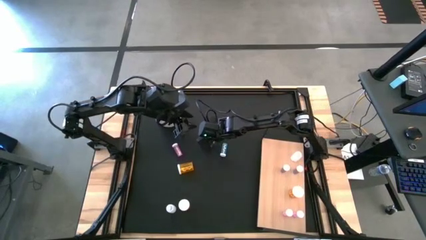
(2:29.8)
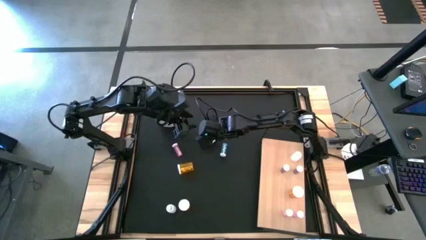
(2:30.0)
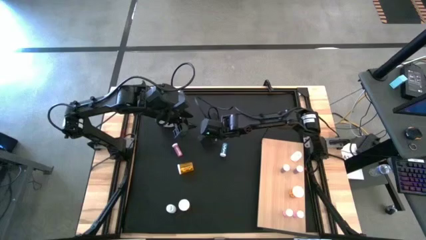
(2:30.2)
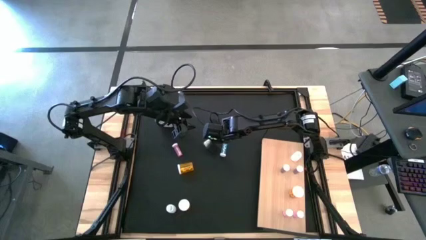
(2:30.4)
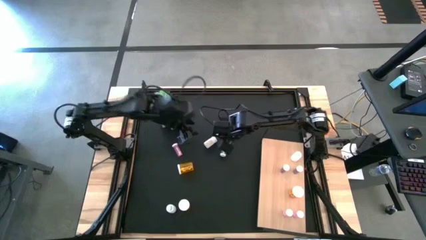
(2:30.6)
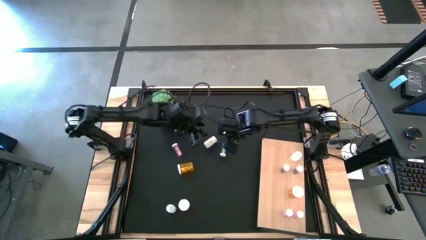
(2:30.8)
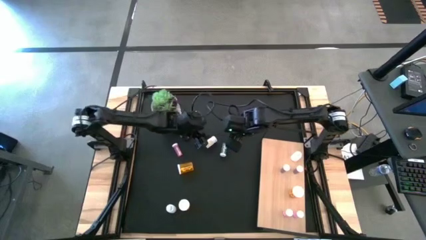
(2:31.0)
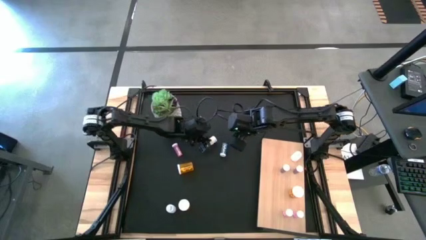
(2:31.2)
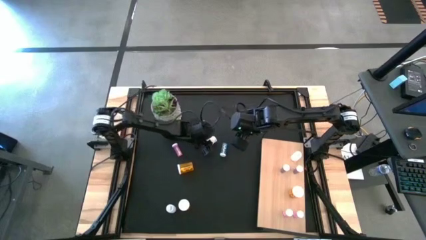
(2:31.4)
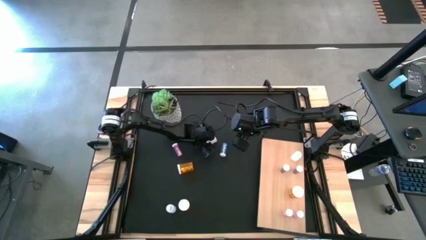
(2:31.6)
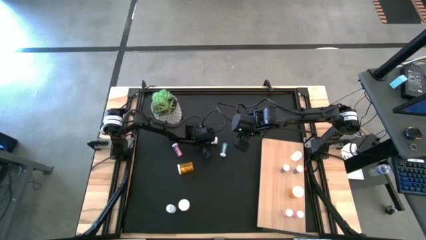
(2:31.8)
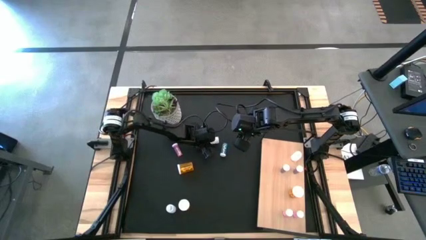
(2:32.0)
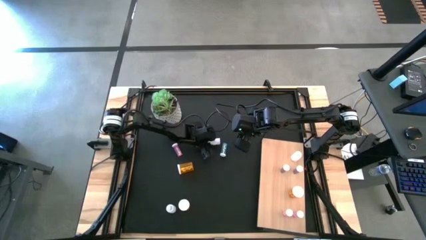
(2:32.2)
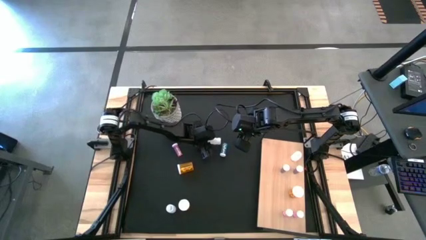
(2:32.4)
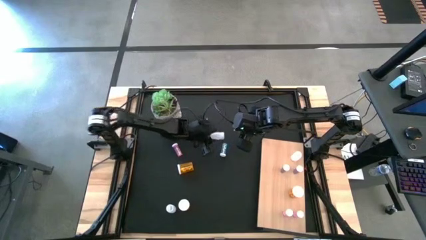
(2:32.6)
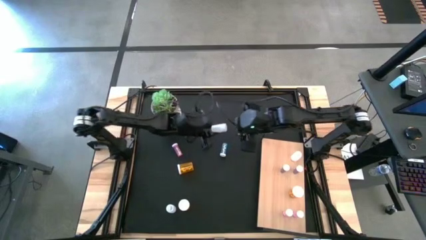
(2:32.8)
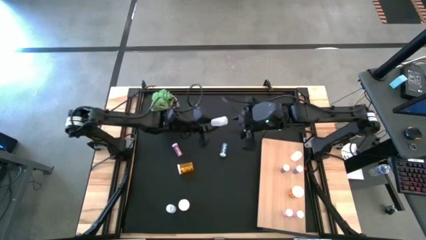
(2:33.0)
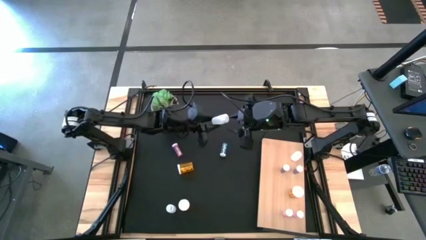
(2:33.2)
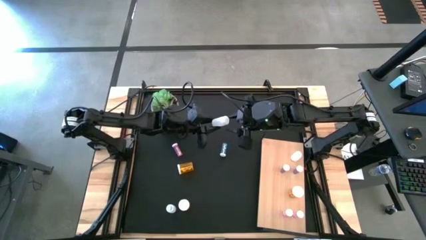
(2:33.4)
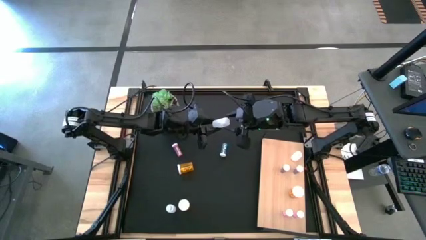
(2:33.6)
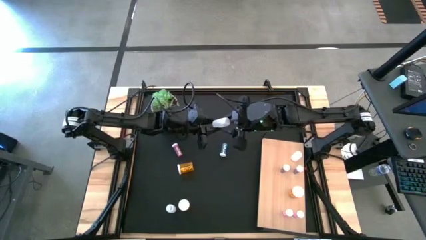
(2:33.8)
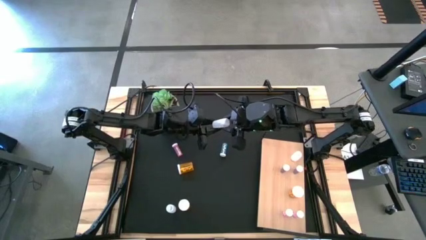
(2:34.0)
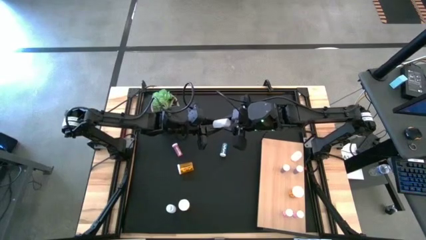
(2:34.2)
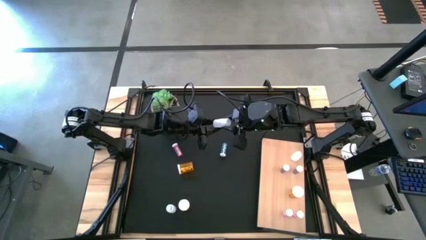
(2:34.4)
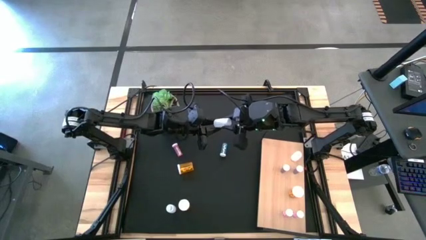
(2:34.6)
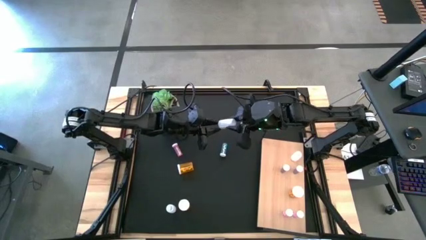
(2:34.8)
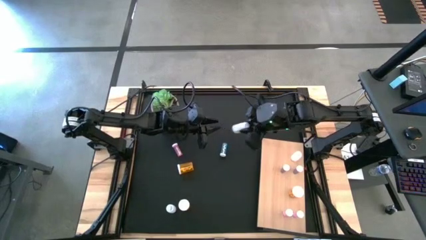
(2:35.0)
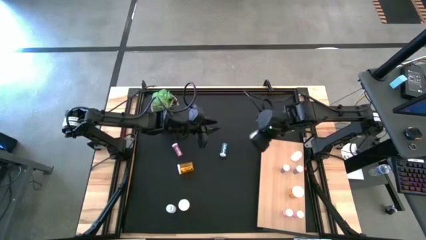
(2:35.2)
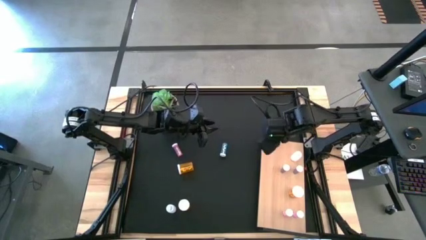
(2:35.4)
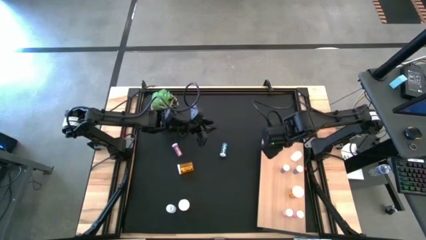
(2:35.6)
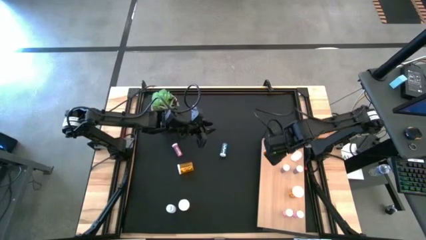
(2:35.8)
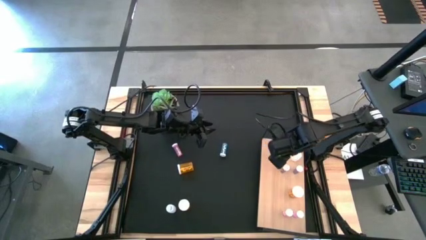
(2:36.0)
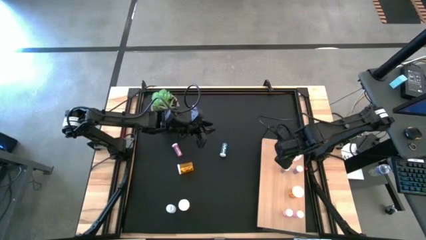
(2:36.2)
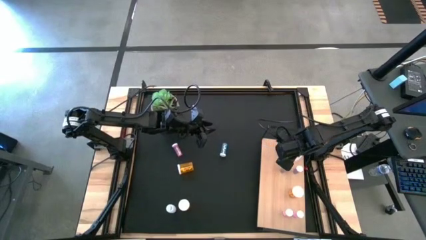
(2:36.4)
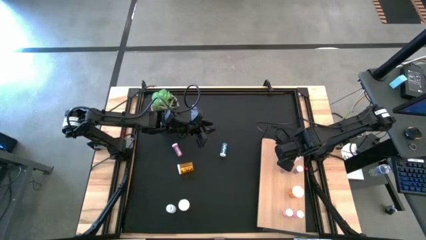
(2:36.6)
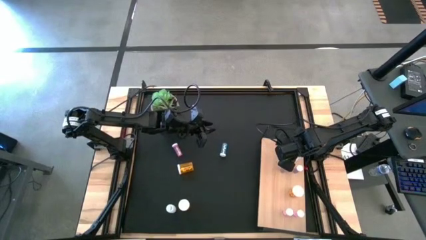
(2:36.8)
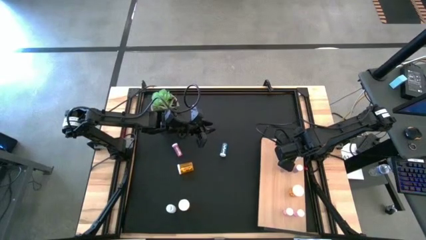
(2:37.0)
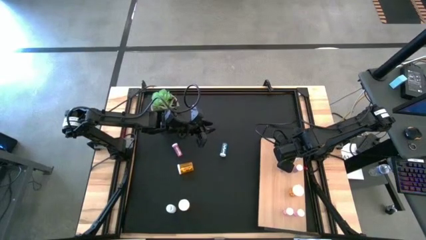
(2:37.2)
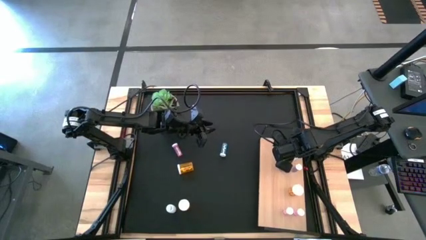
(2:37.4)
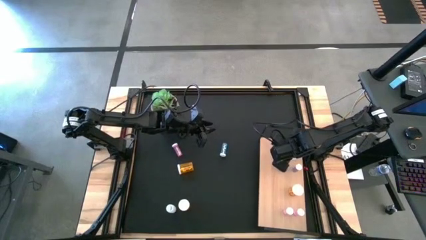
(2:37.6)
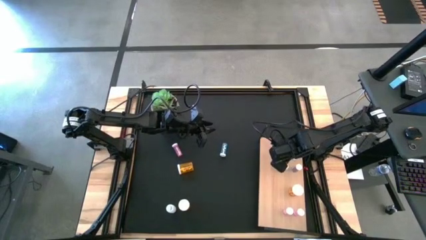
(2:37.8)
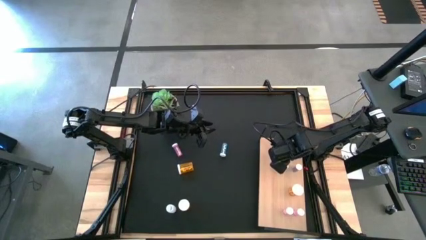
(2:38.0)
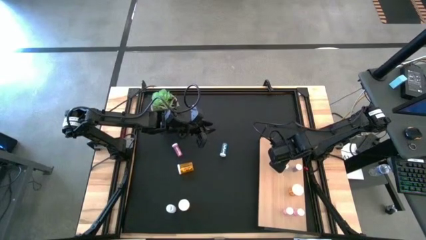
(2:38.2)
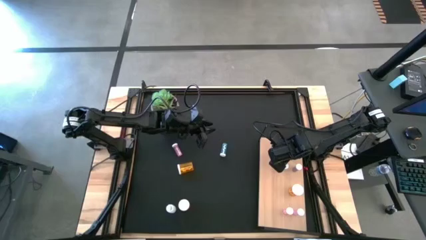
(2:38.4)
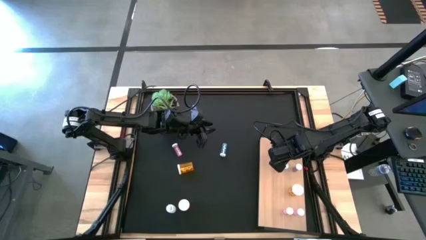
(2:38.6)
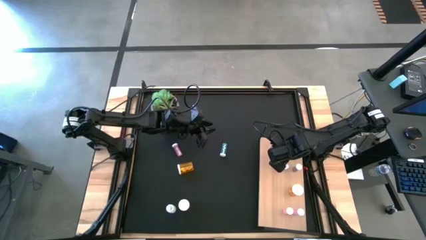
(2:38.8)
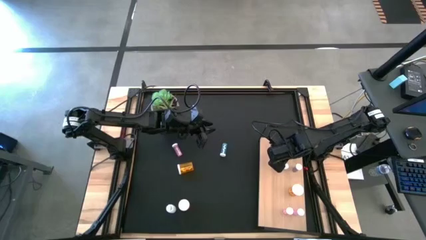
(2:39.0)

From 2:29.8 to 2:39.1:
Task: Pick and place medicine bottles onto shelf by color
Put the left white pill bottle on the shelf aligned with the other white pill bottle

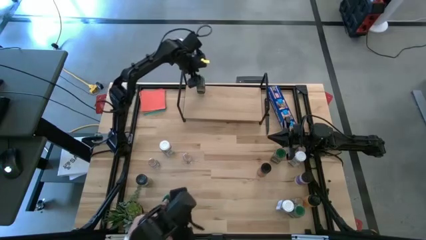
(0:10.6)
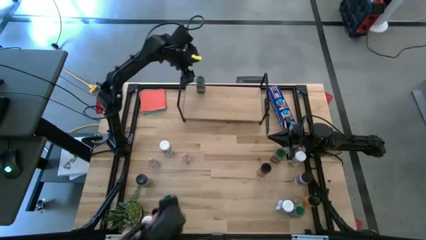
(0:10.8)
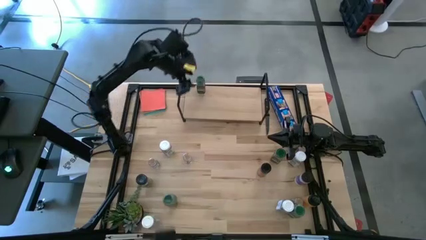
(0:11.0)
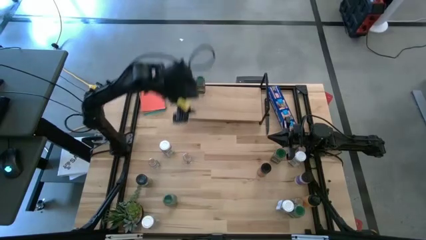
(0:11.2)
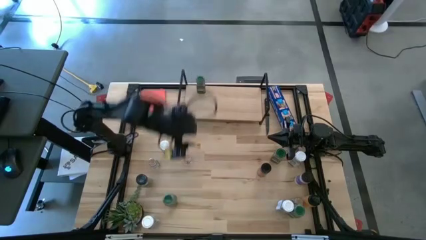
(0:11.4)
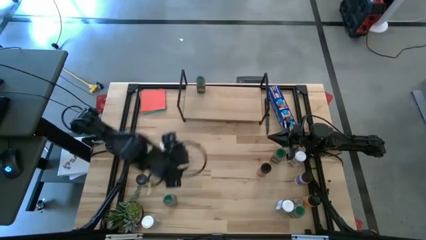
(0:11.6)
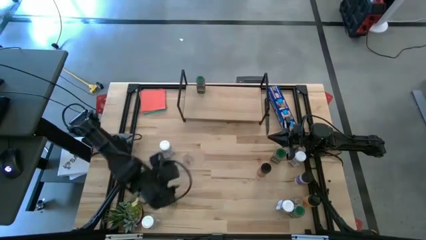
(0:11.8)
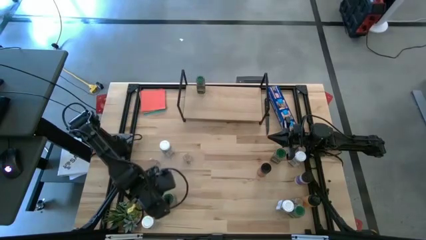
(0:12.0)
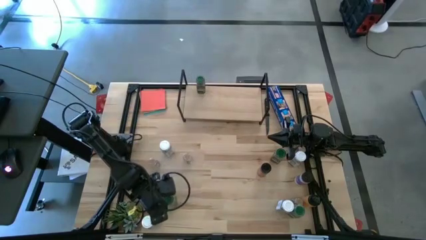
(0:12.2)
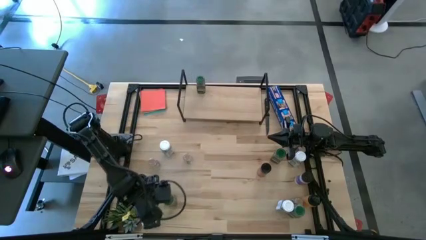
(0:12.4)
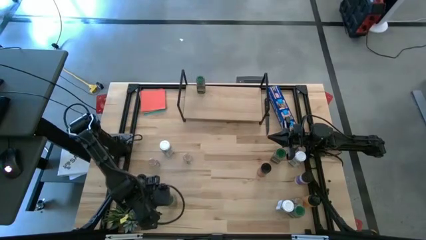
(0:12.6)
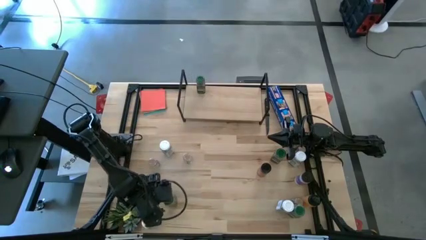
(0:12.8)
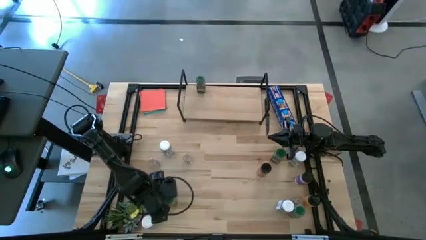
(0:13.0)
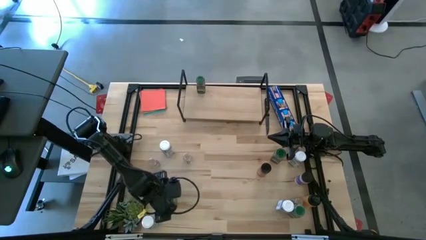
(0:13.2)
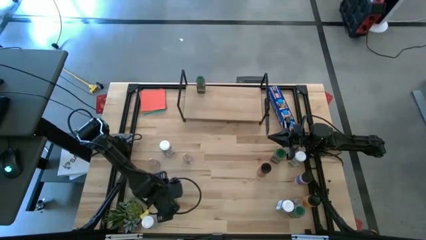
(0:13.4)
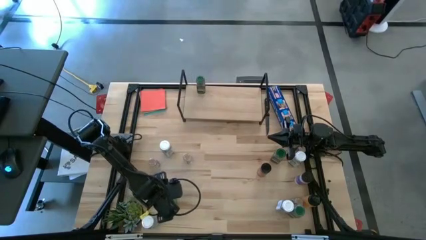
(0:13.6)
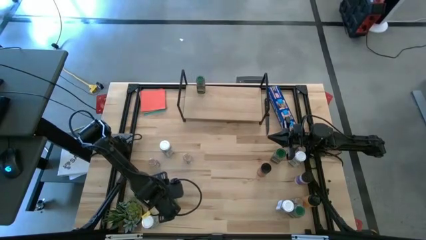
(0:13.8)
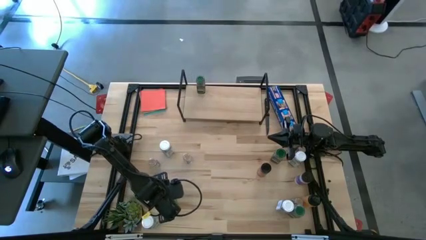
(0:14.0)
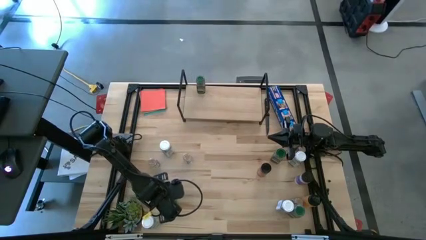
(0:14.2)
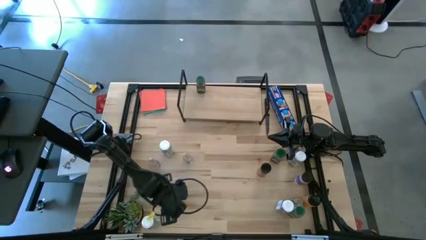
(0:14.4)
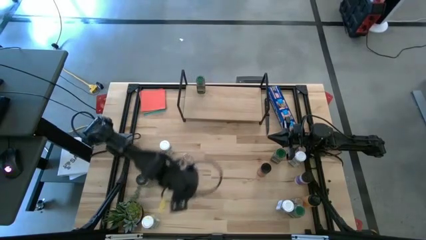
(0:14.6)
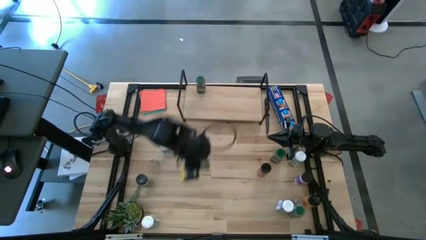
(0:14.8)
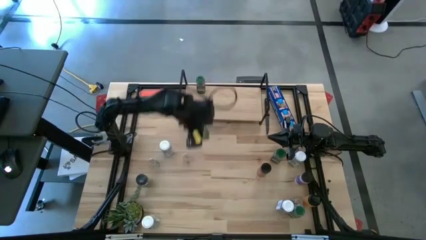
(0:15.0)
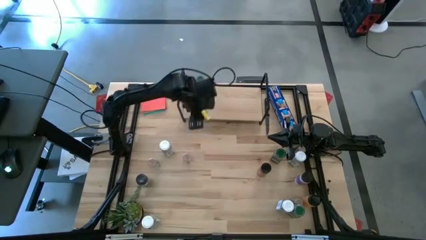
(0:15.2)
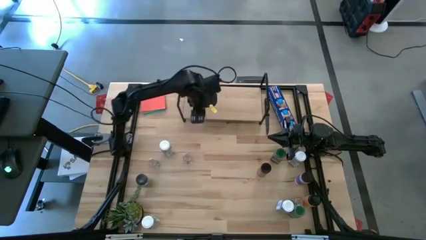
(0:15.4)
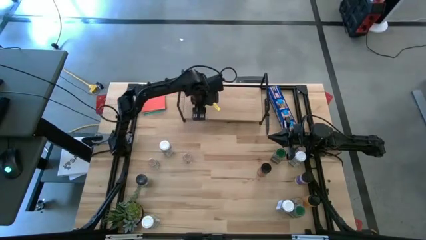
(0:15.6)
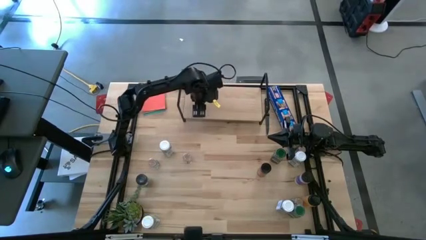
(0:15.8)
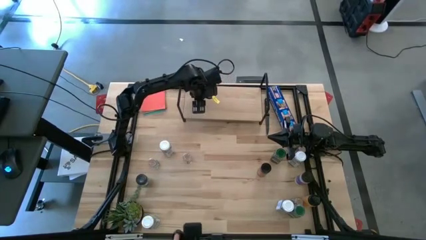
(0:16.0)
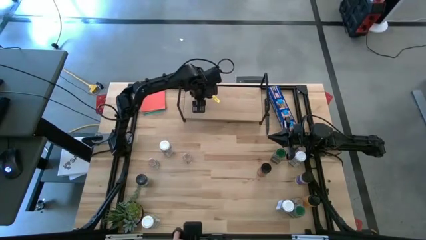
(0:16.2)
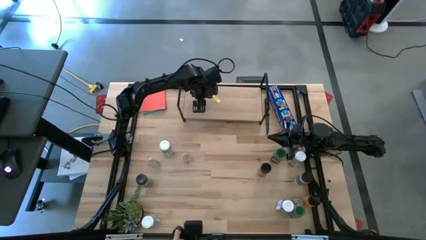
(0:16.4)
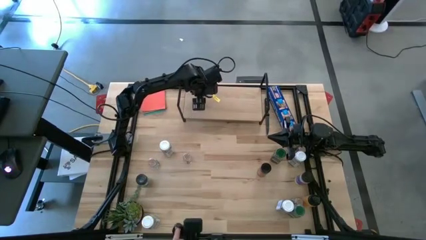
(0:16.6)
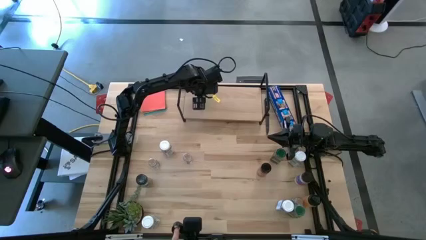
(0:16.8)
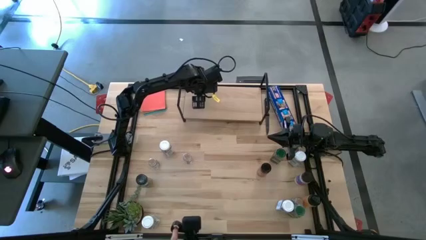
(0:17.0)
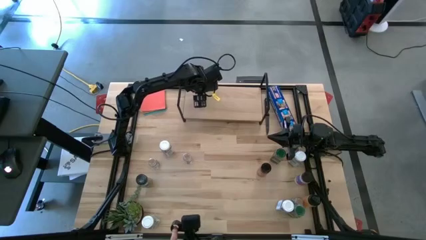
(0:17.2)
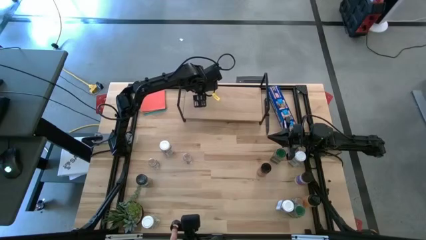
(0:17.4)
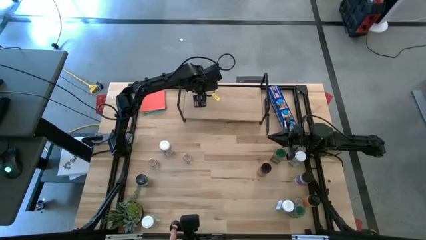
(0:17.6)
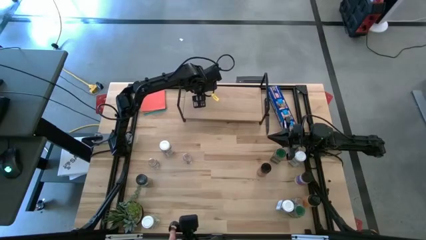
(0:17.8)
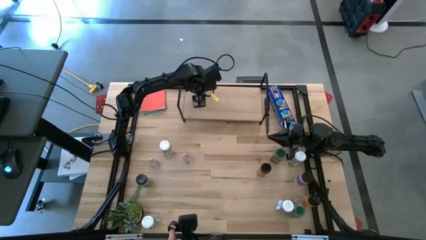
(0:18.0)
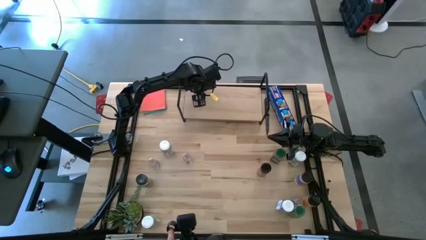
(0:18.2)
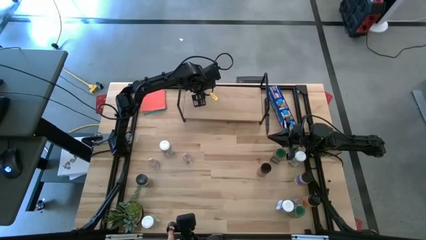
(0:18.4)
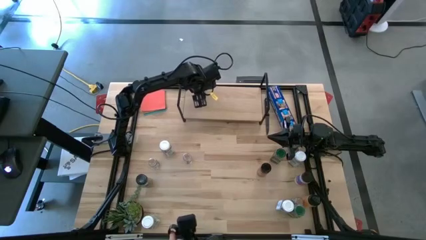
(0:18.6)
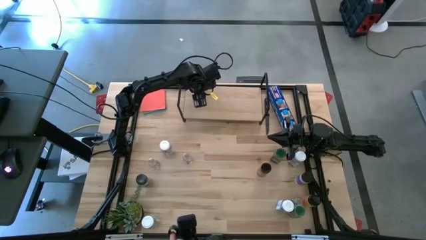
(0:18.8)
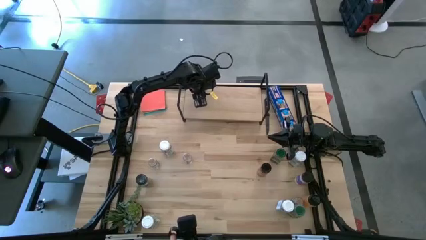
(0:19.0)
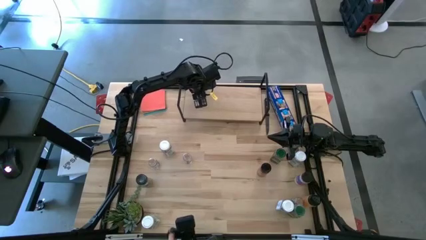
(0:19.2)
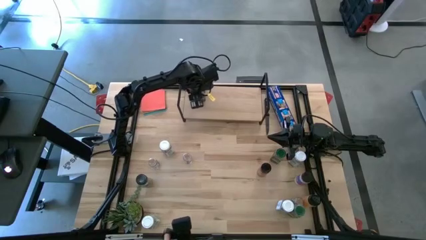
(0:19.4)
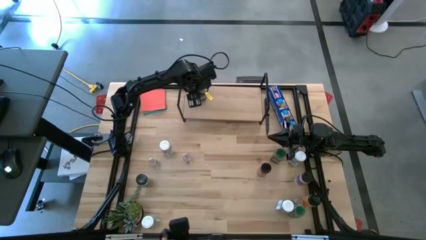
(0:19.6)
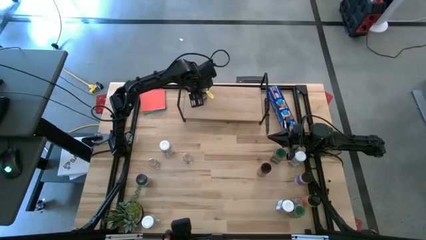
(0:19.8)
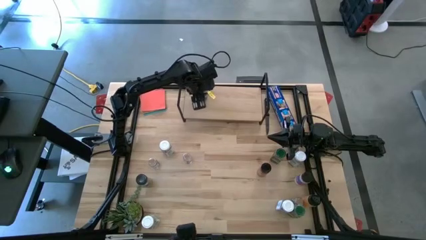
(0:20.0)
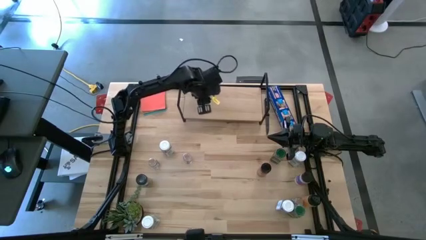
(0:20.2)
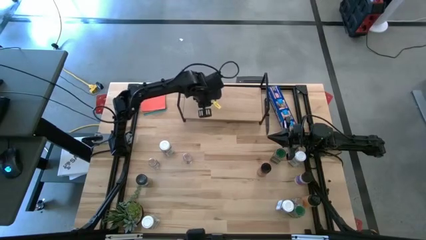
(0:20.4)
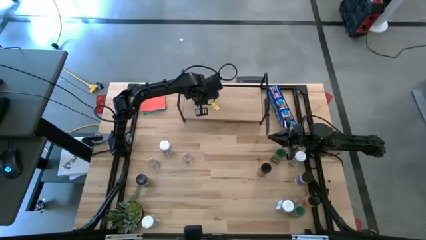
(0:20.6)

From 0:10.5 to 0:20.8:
Task: Shelf spices
Put the bottom left green seasoning bottle on the shelf aligned with the other green seasoning bottle
